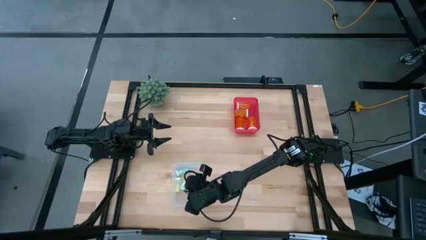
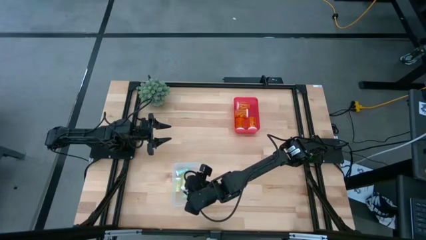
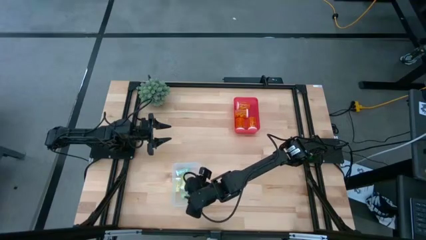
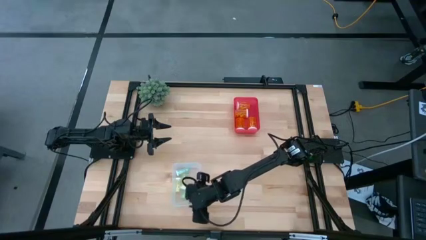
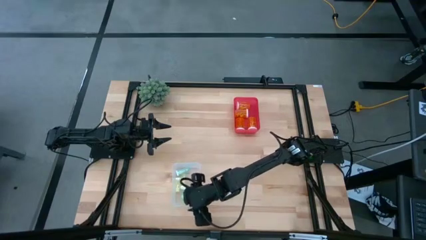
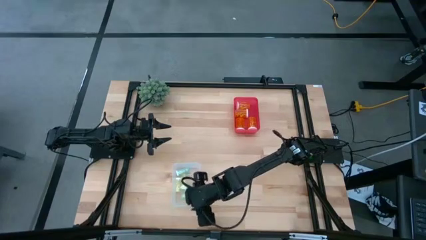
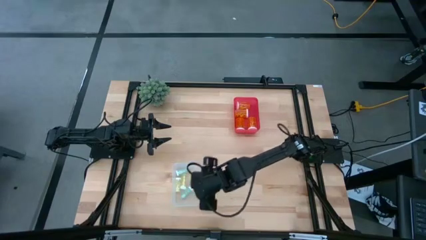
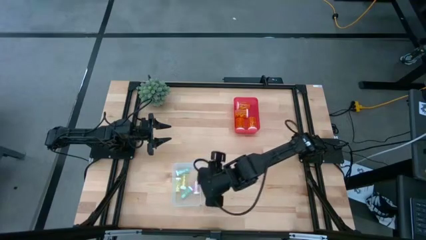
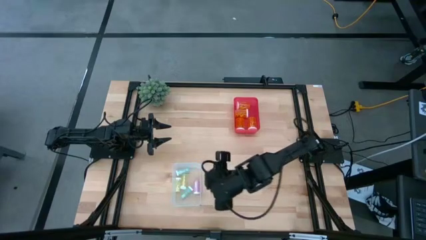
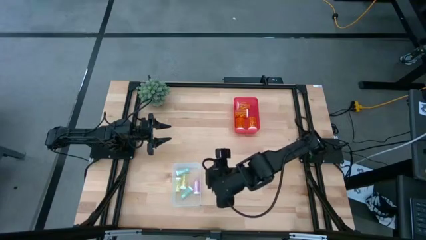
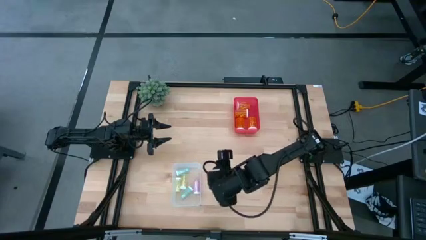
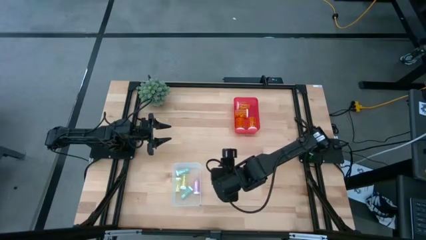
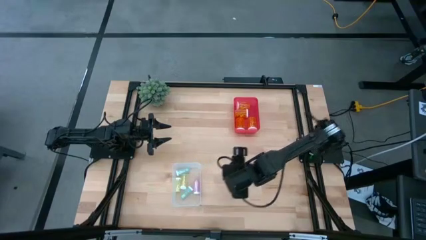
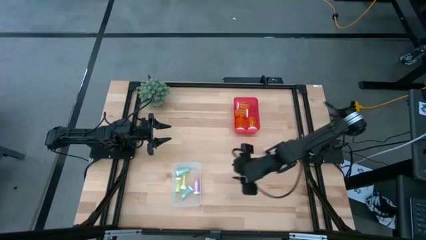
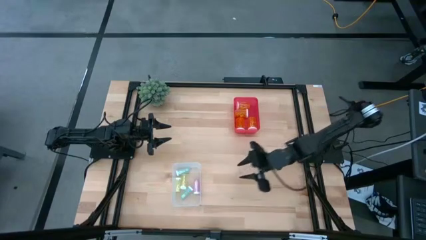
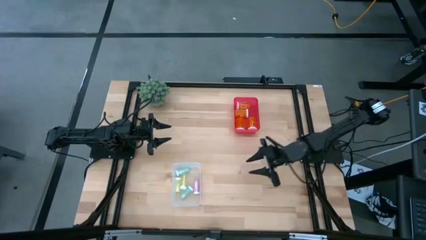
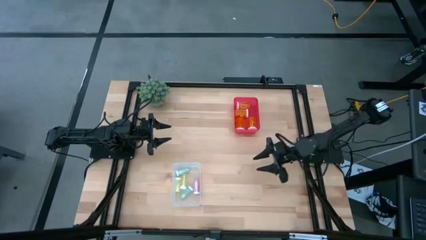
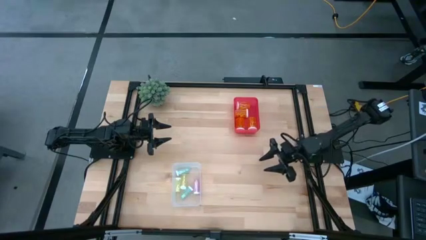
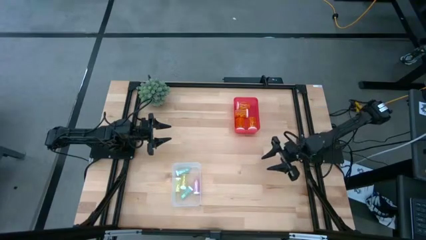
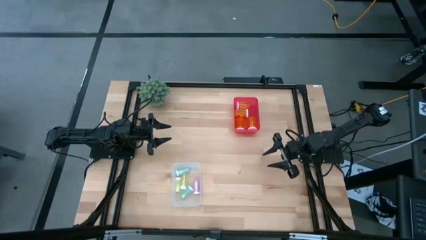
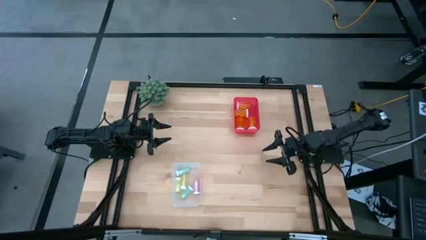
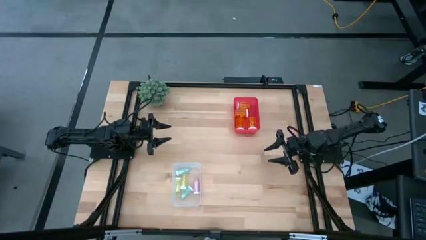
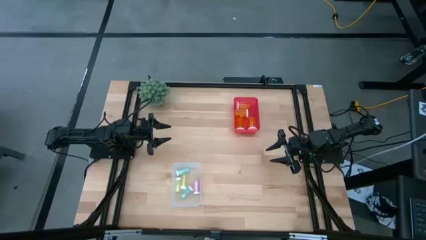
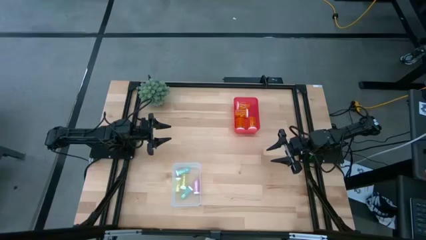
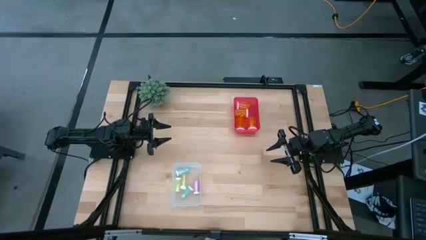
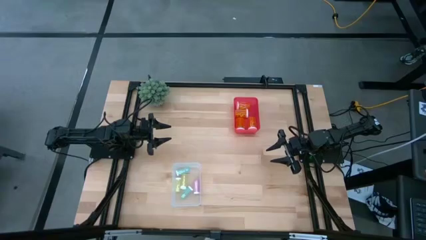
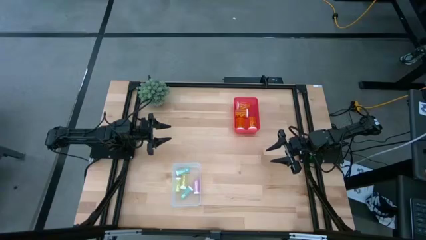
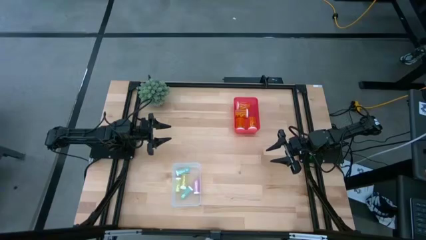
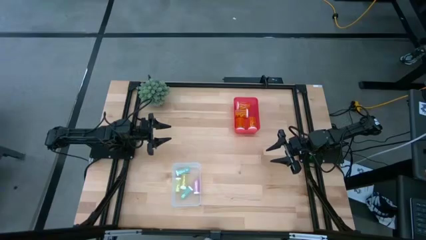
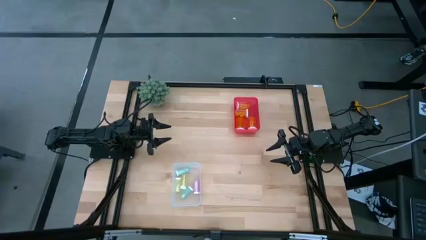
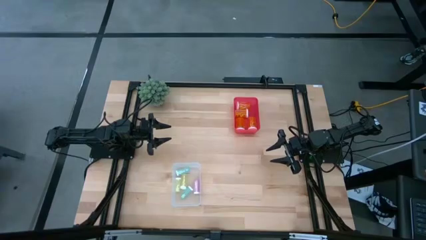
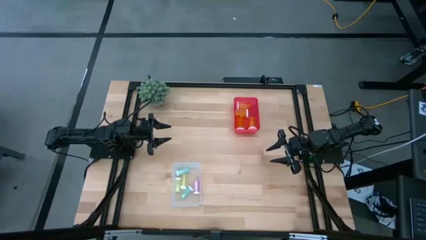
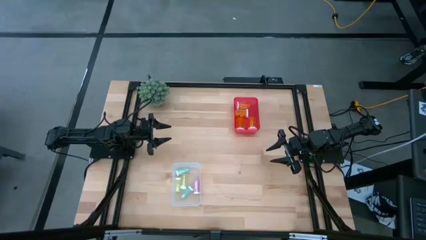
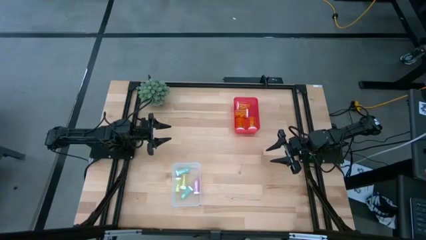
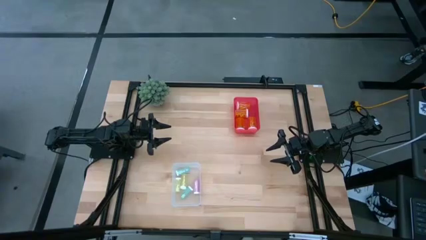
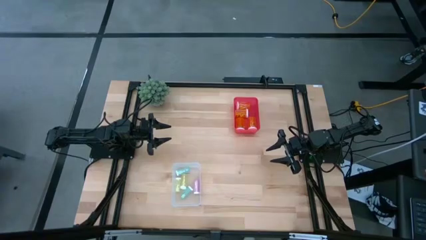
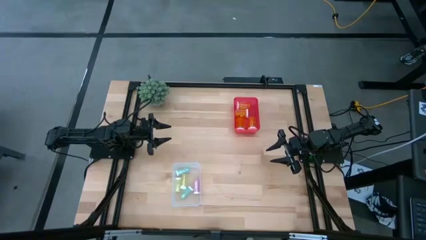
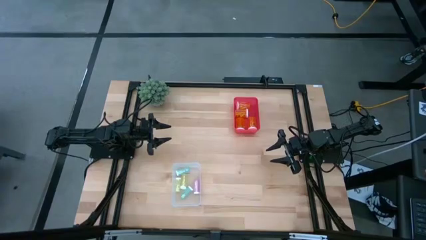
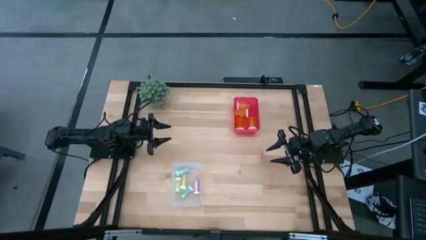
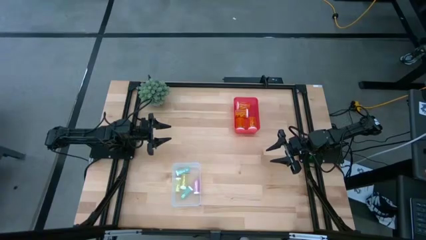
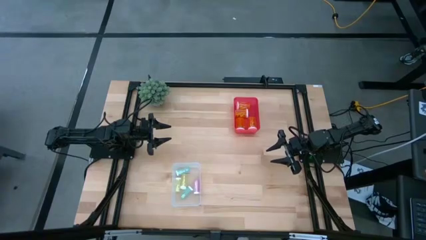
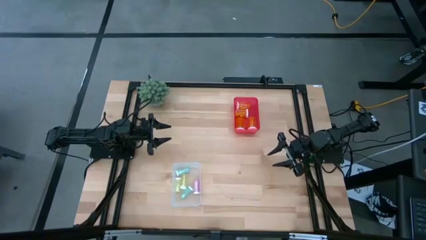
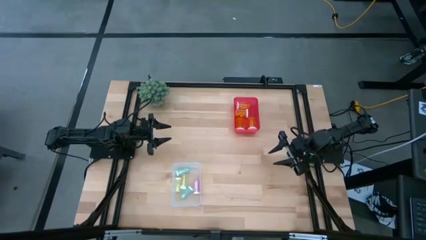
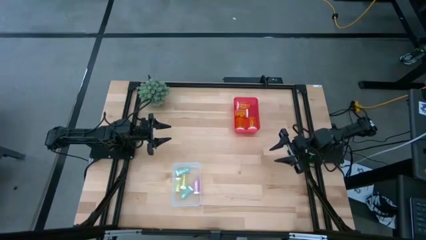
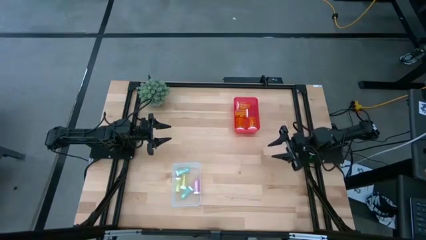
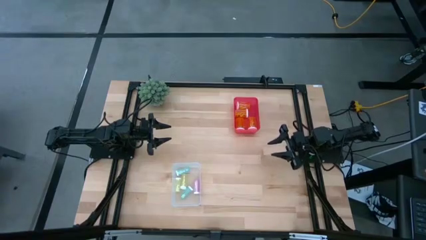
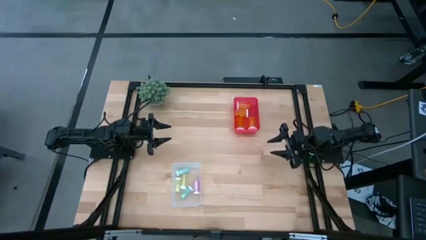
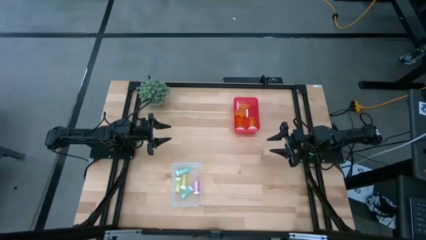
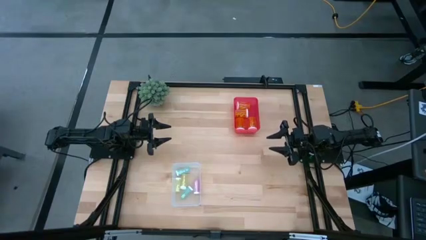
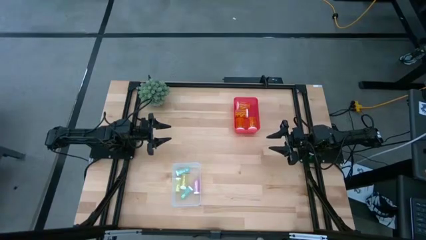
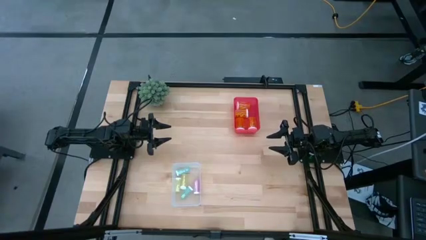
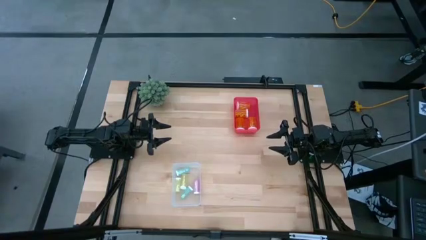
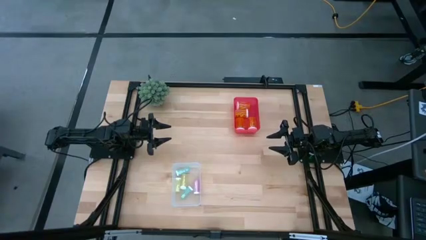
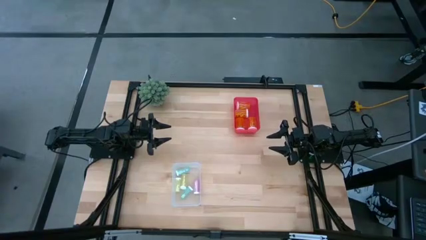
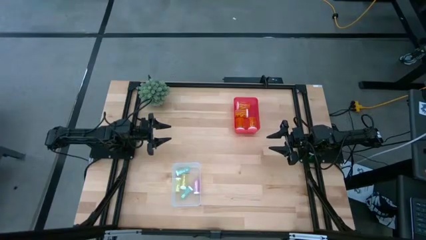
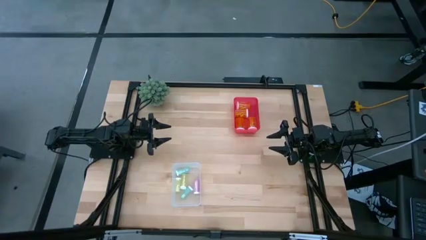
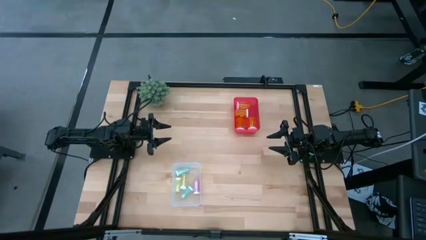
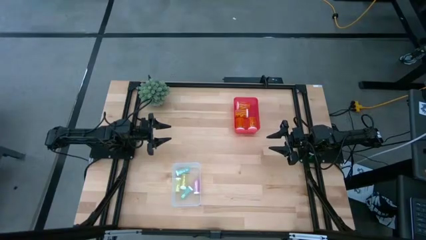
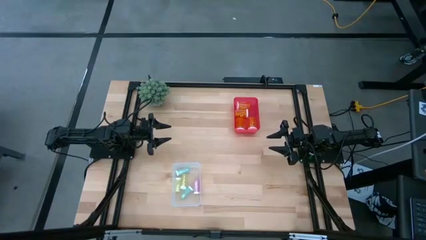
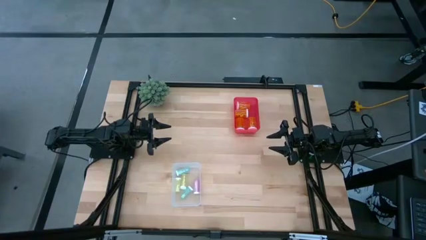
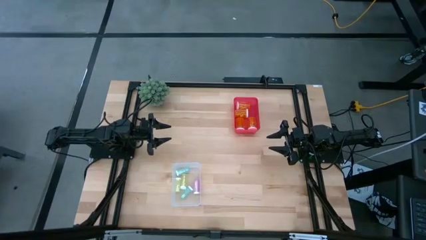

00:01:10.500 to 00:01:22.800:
Task: Pick and place medicine bottles into bin by pill shape (circle, oval)
Return to Home Position

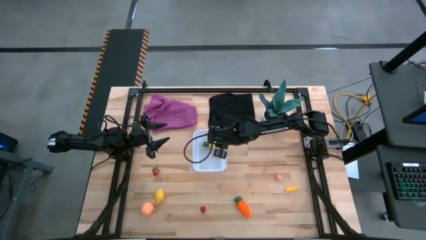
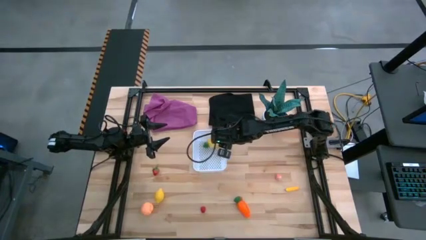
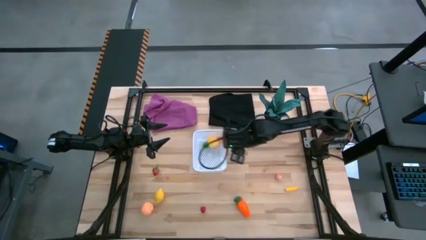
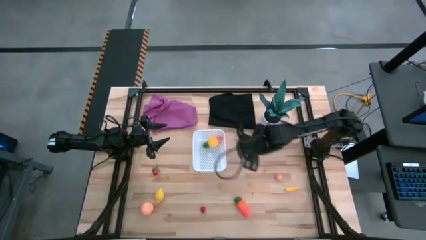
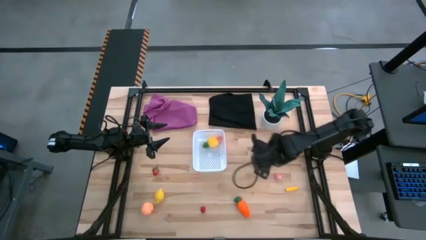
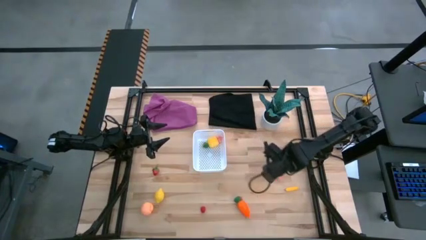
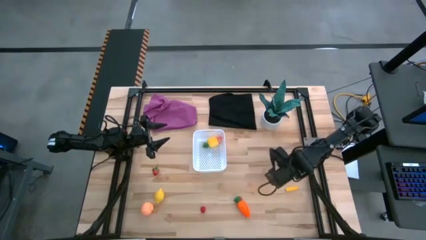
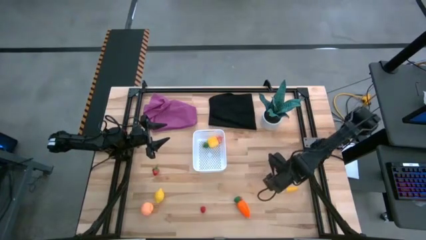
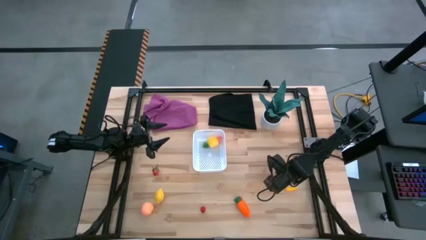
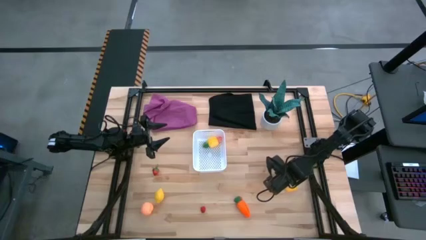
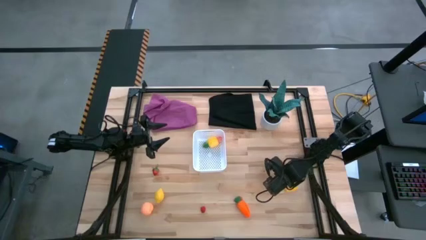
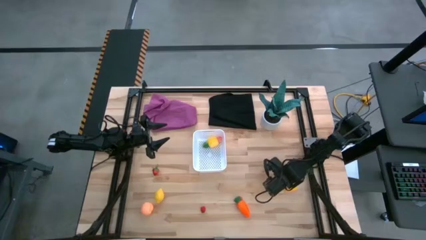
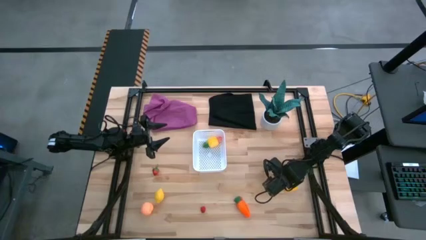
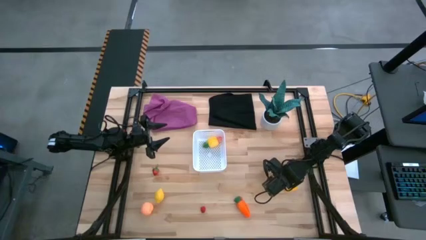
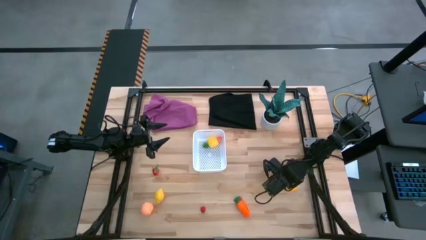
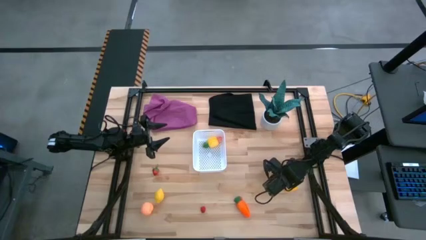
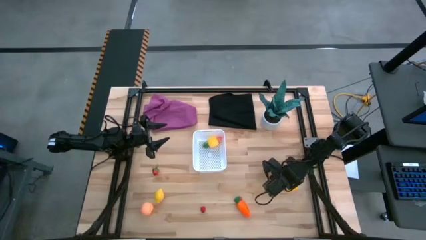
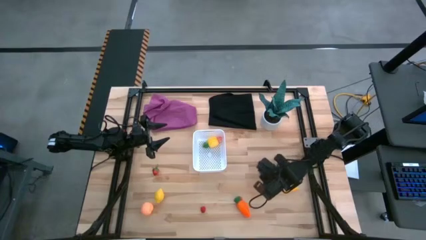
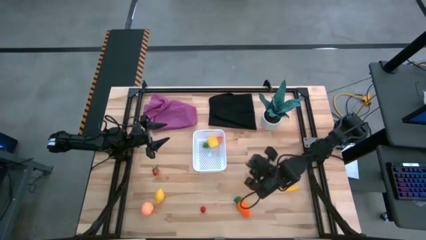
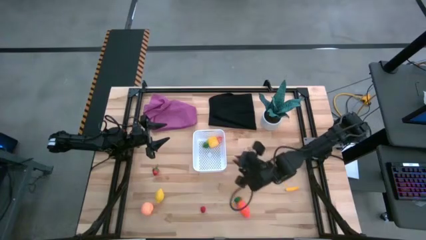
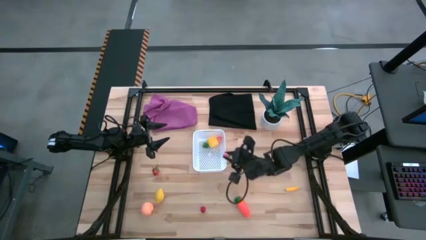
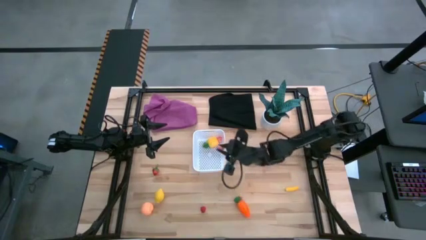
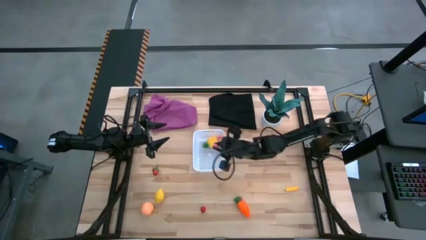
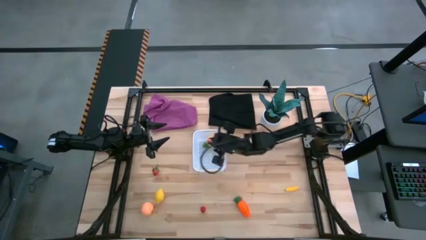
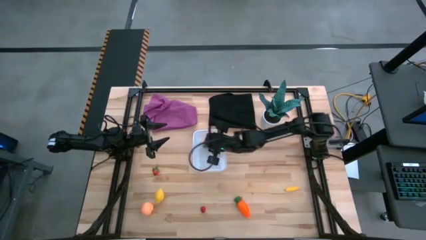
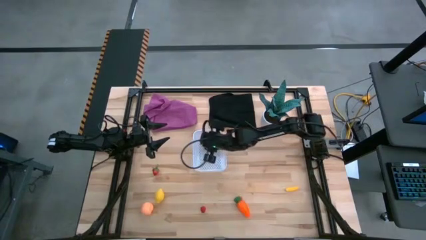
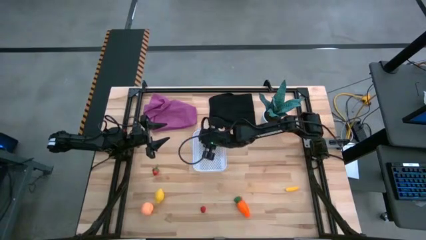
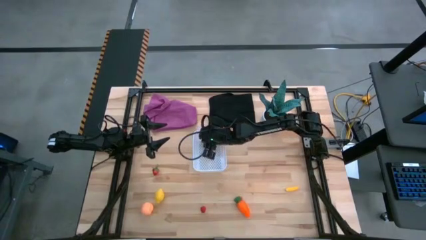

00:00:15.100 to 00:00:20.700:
Task: Pick and placing Produce into tupperware
Put the pink peach into the white bin
